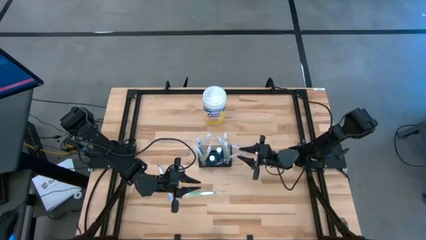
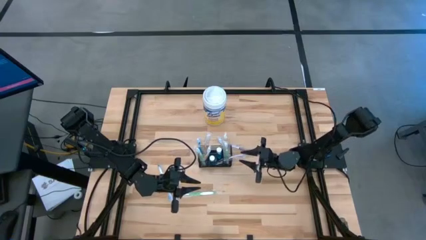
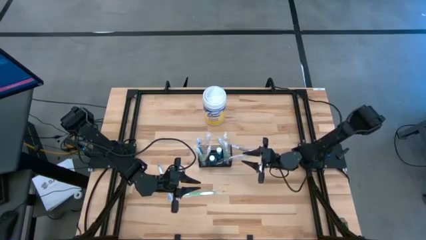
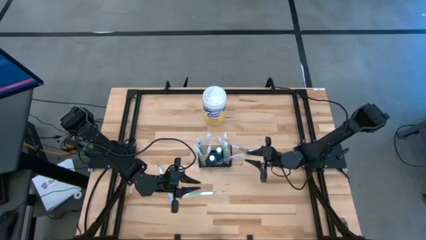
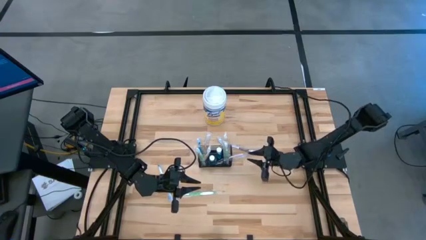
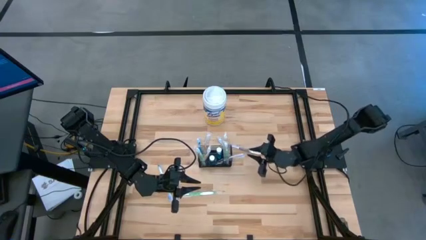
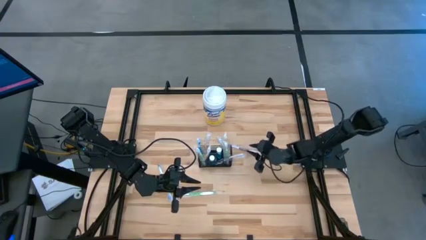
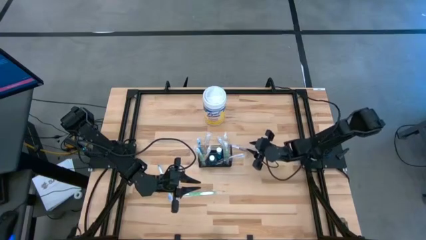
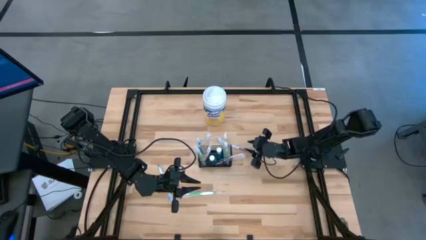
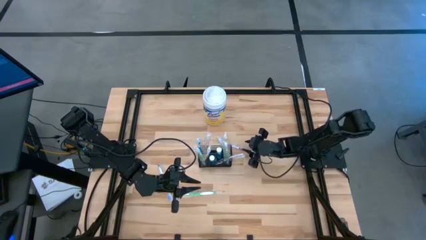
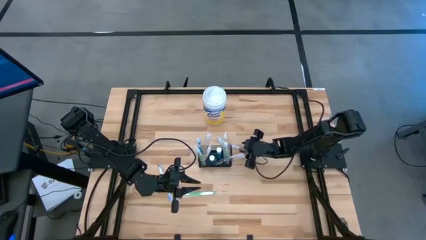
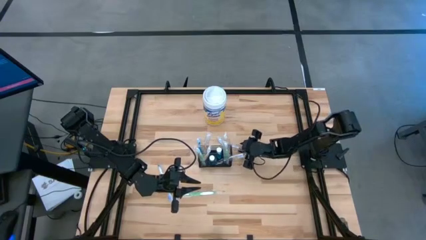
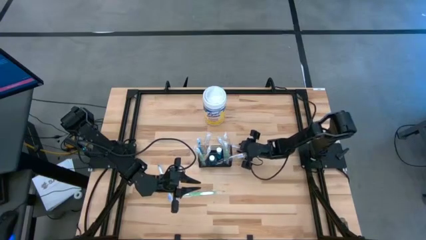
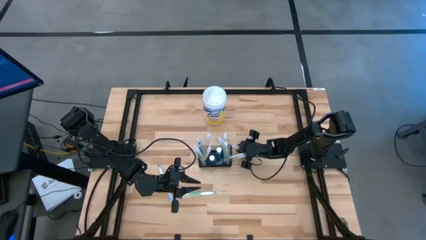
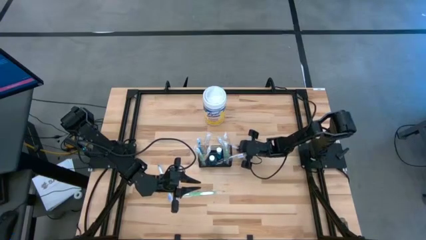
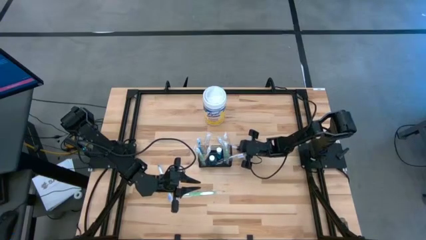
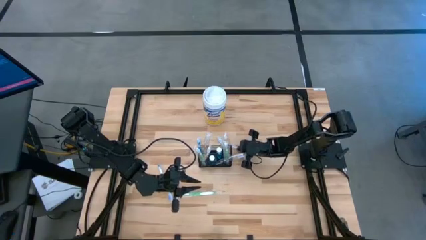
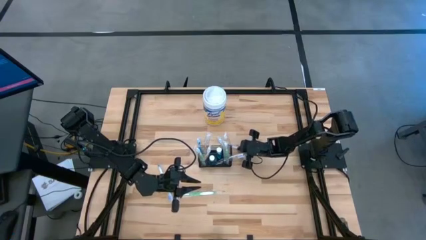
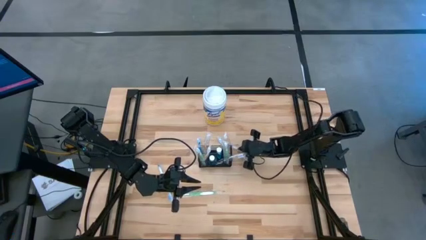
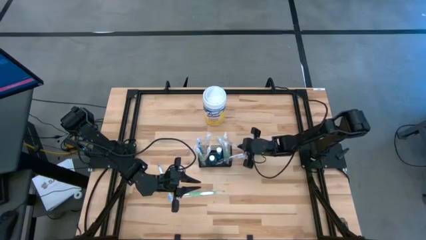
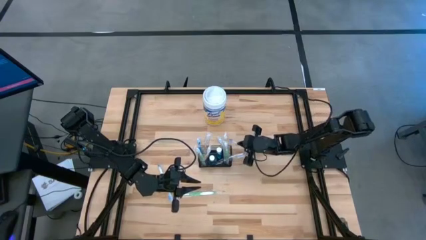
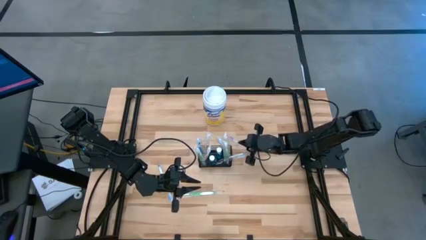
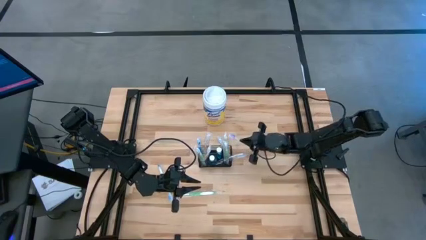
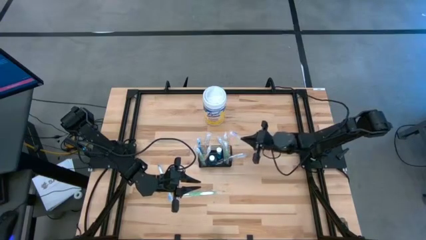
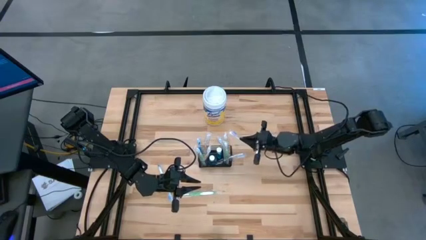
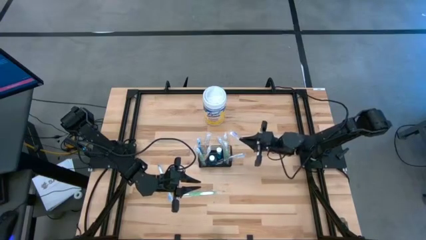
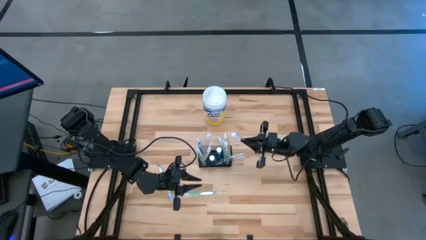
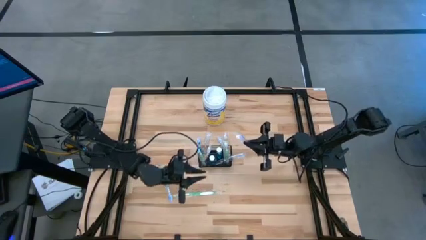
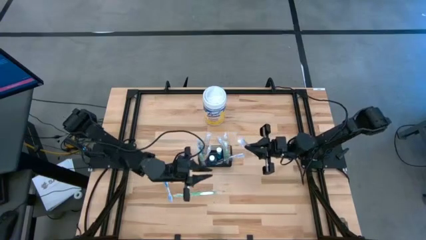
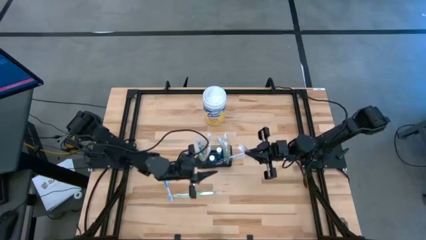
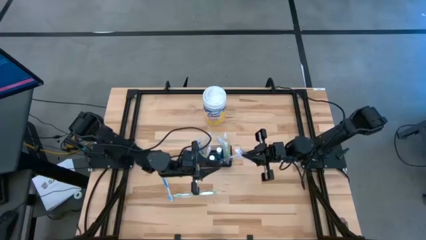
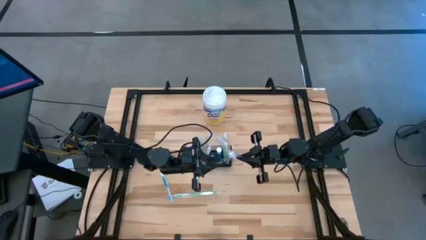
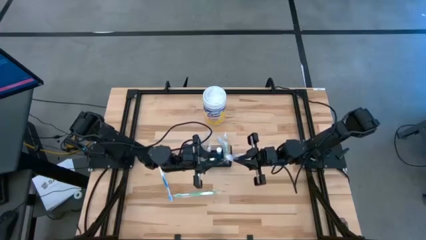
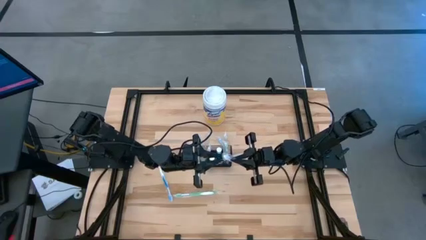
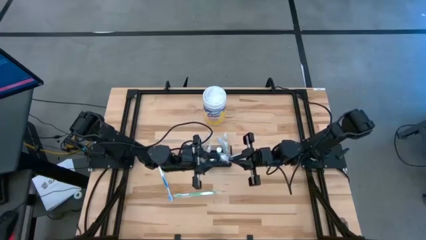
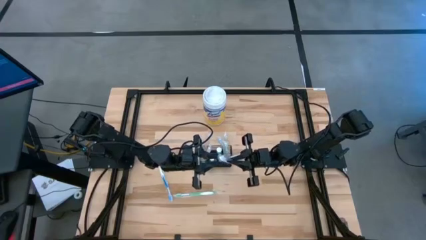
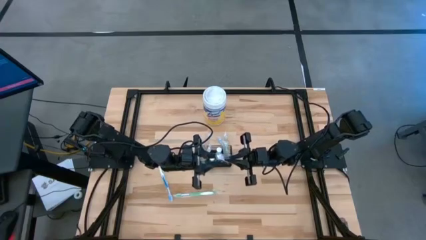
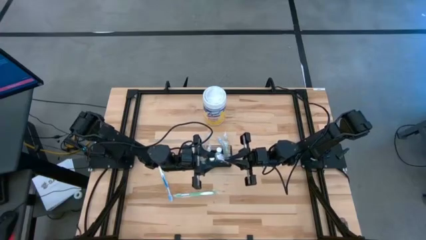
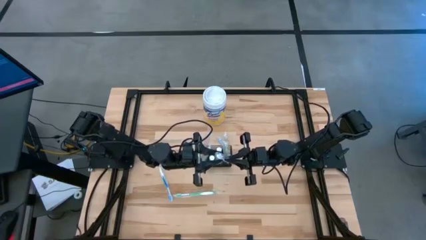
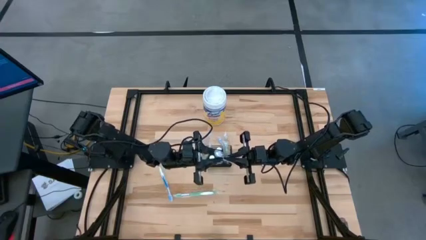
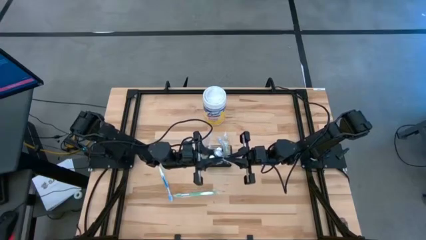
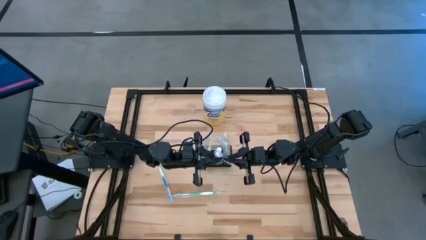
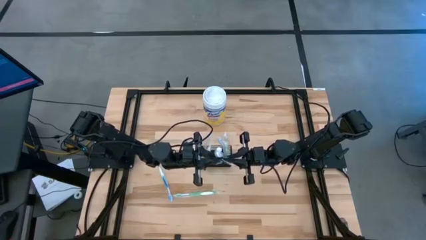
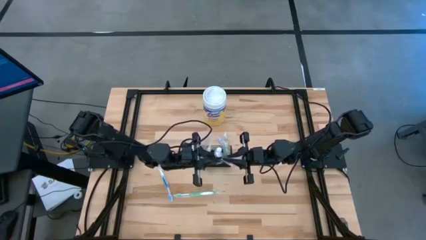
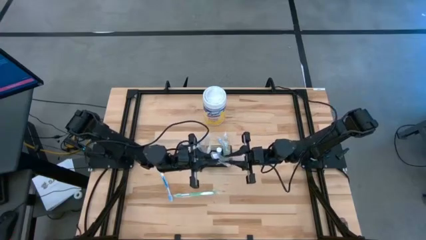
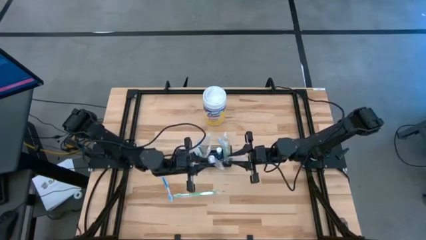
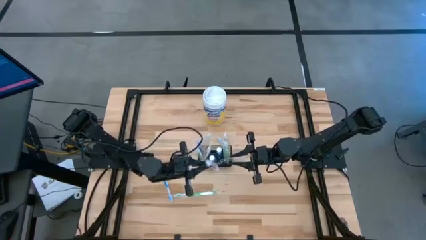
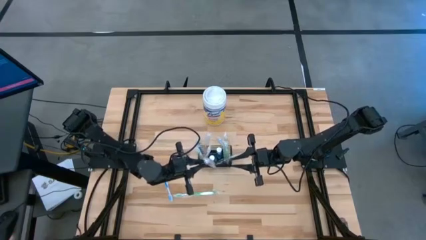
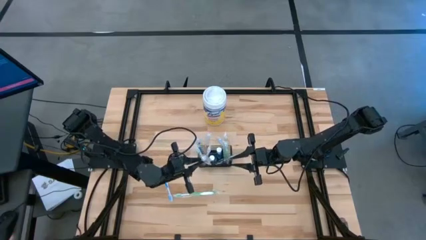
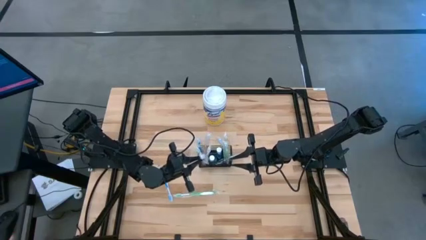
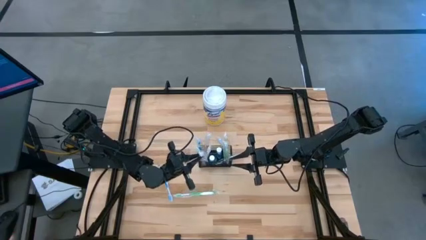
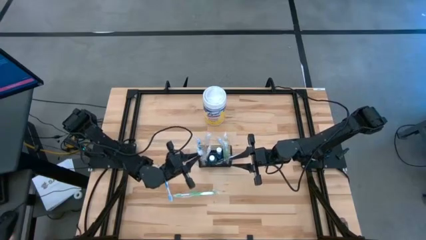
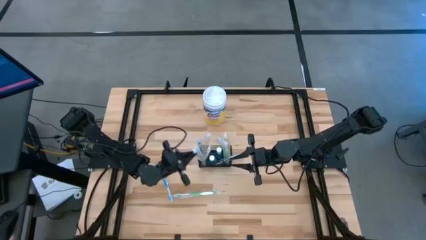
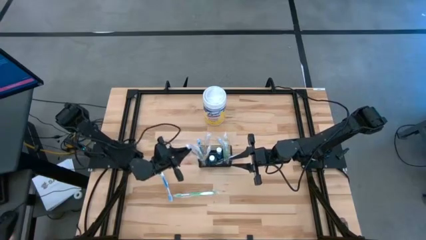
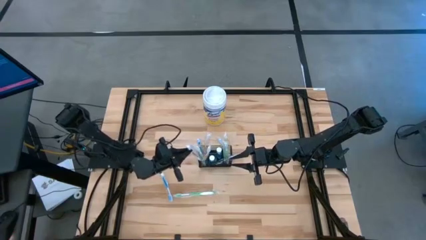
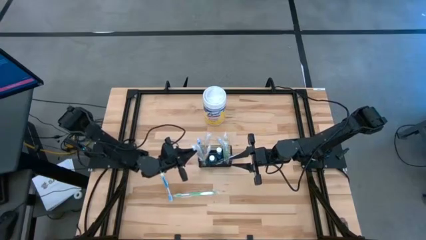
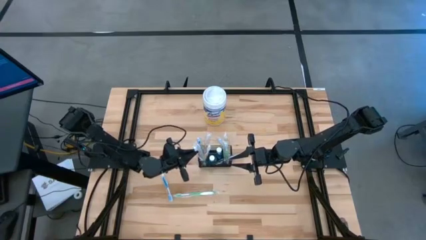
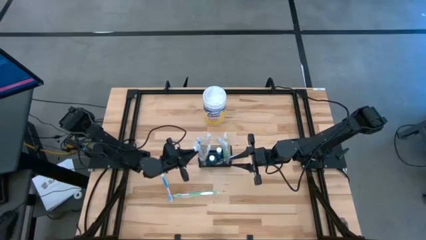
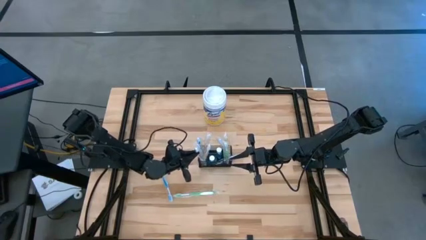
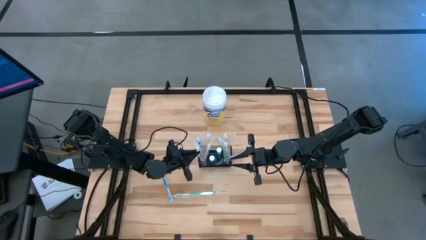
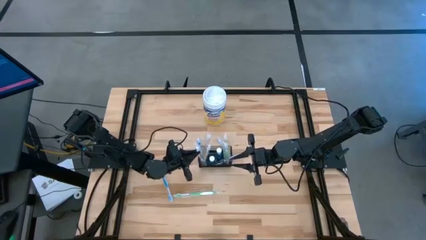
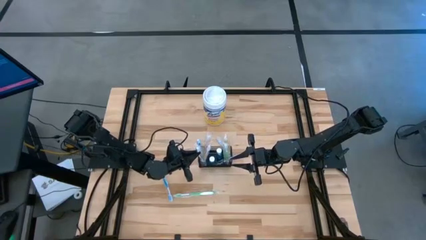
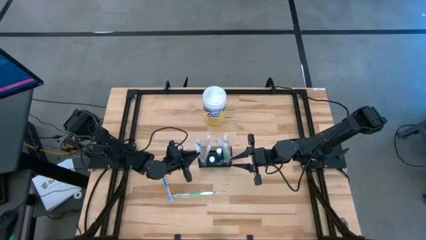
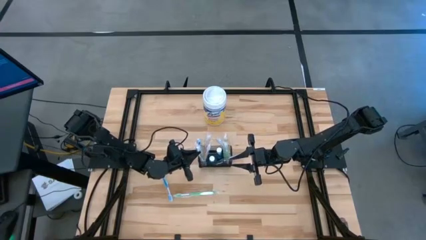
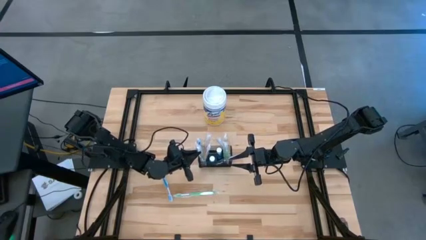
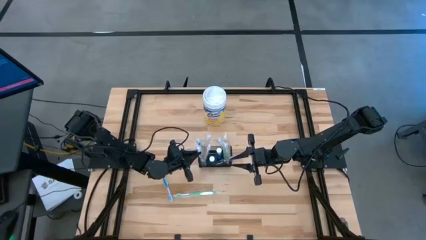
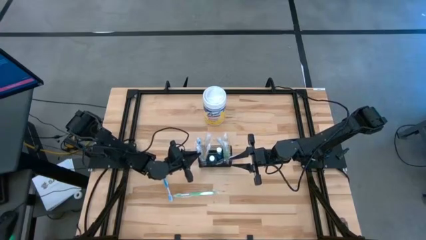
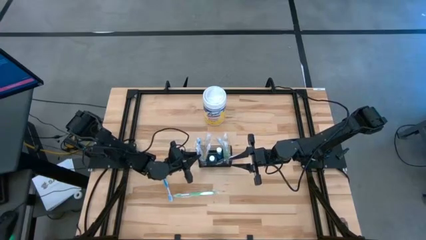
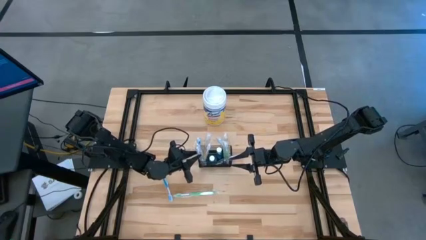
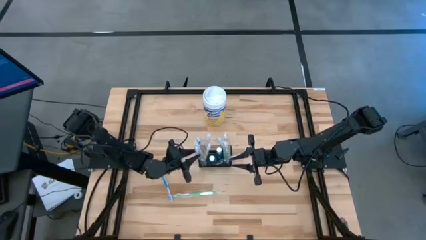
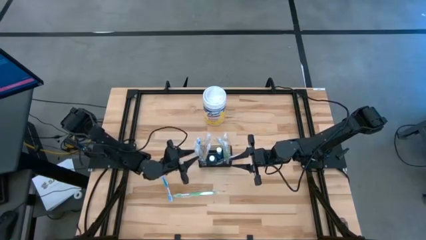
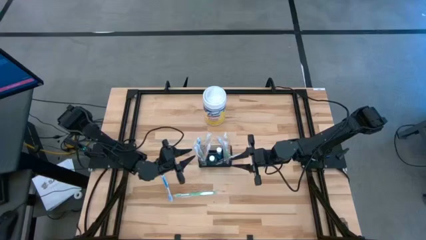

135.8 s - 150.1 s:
Task: Pick & Place toothbrushing station
Put the purple toothbrush into the mesh organizer

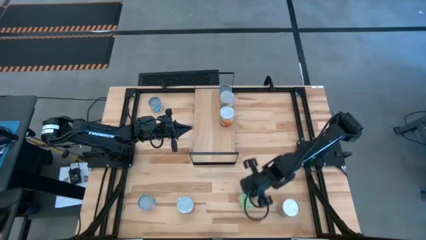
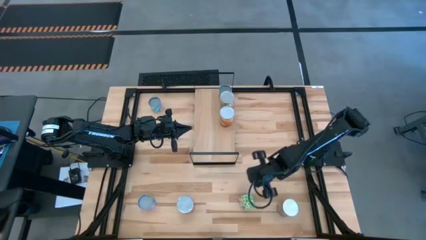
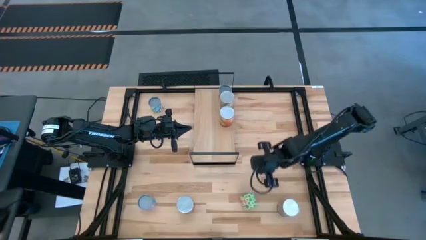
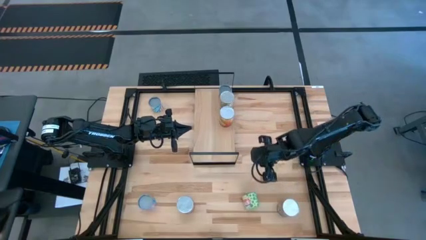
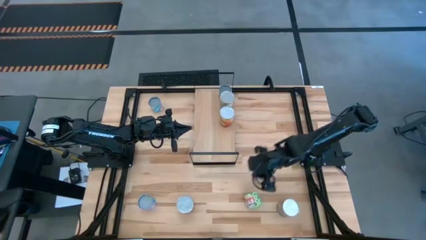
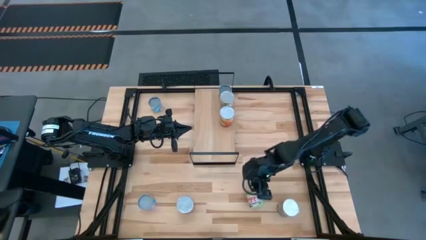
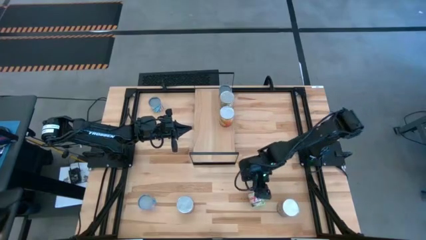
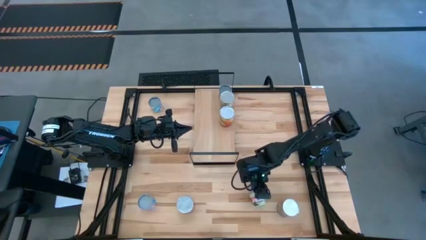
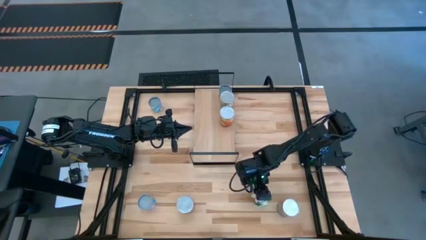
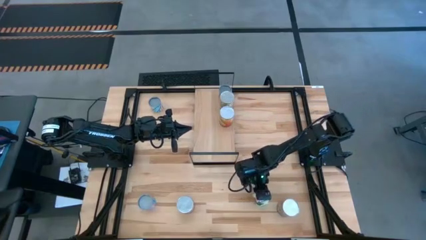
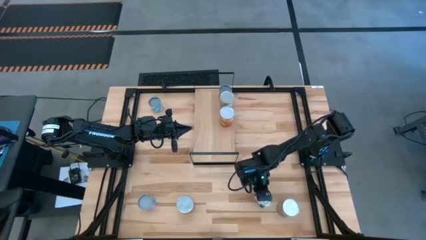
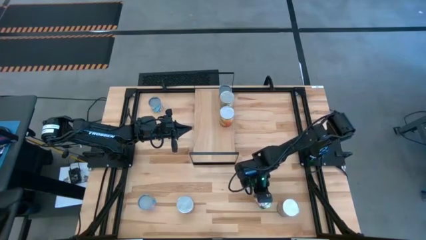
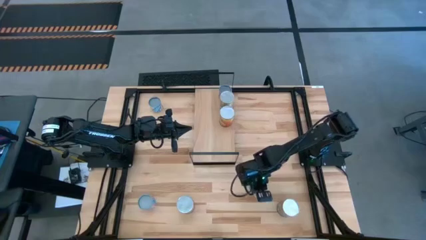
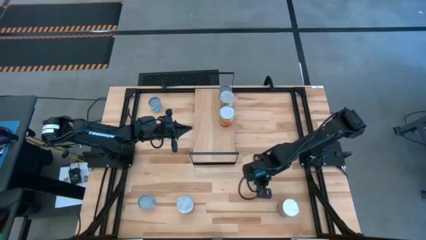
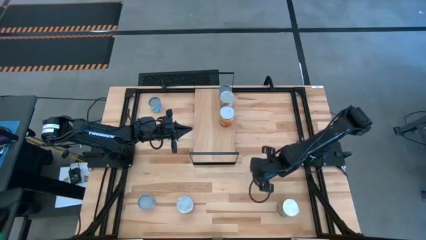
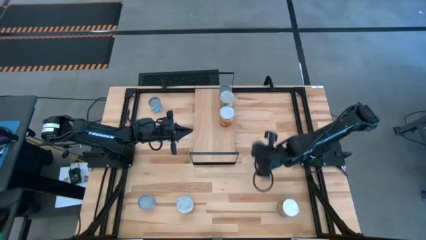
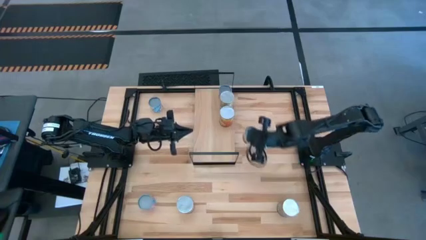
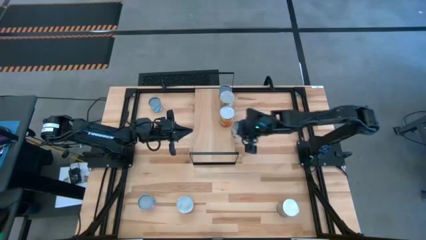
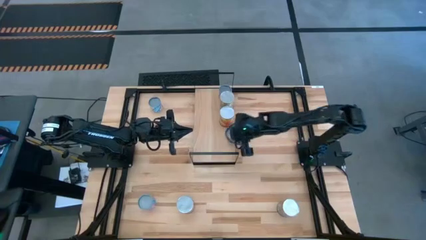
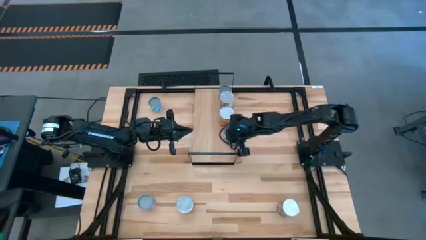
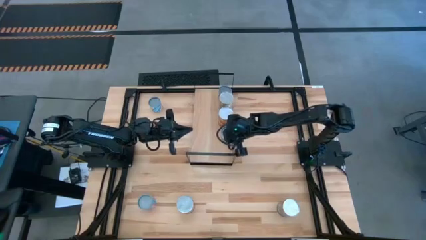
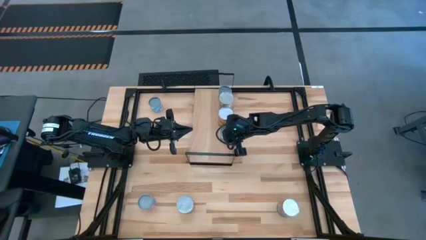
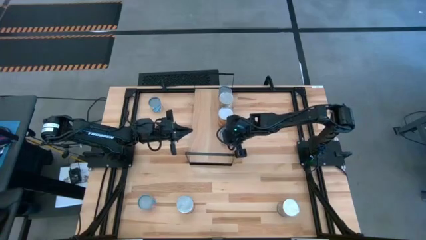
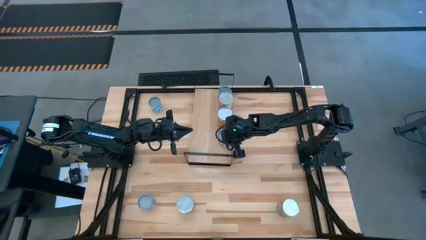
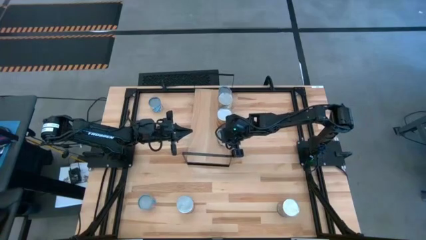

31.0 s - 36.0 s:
Task: Pick and place cans onto a shelf
Put the small green can on the shelf
